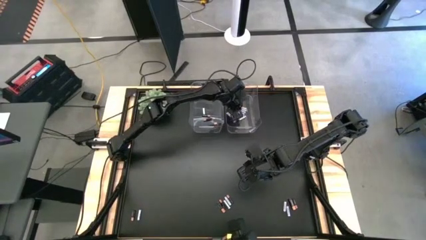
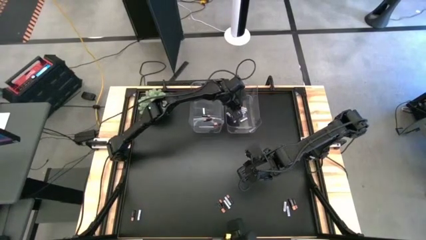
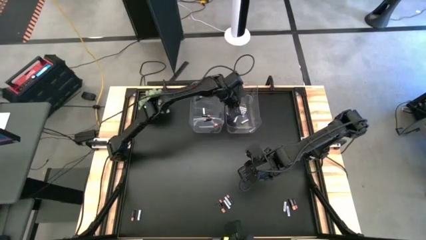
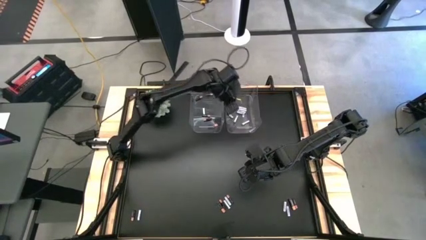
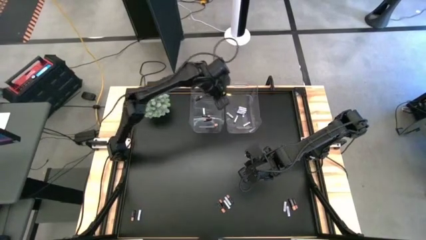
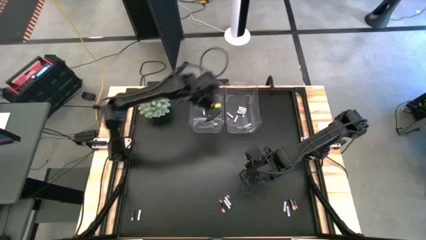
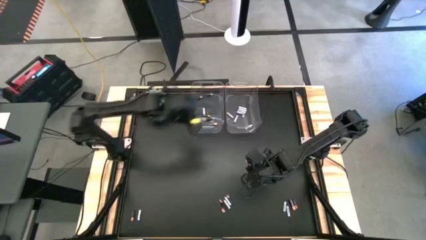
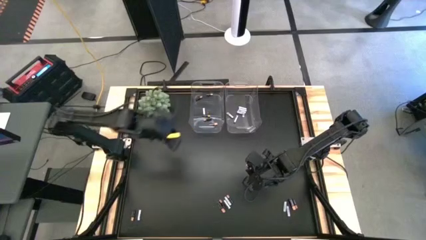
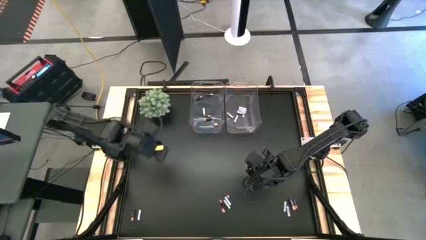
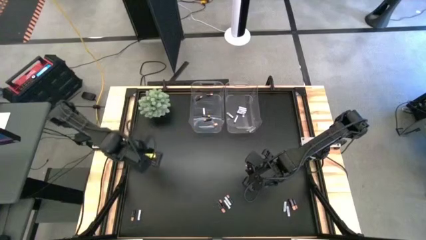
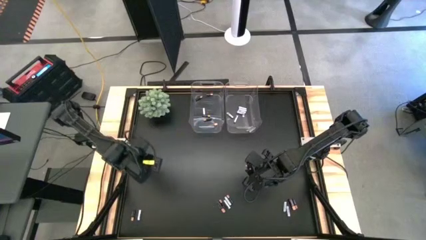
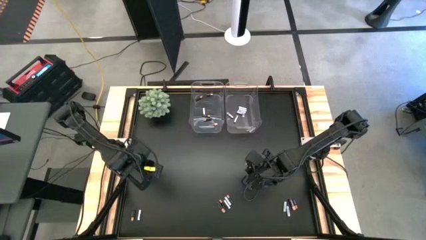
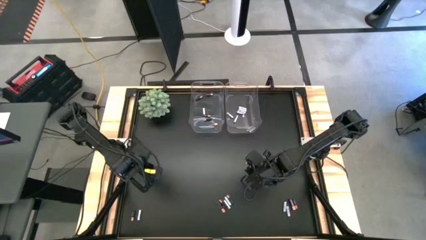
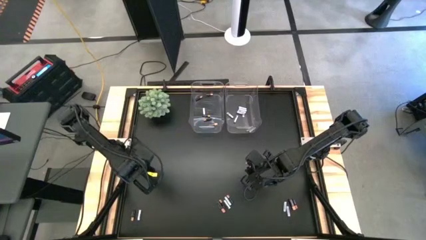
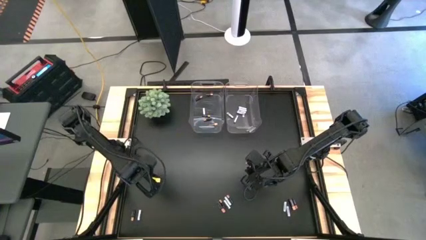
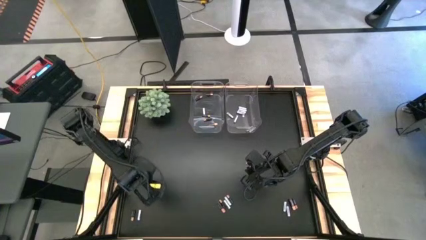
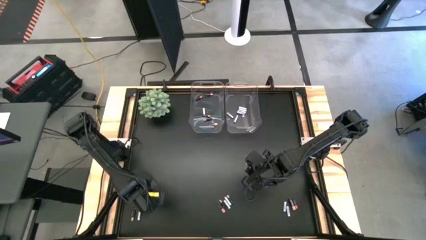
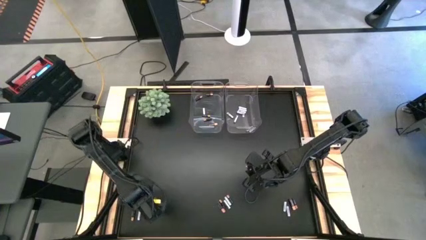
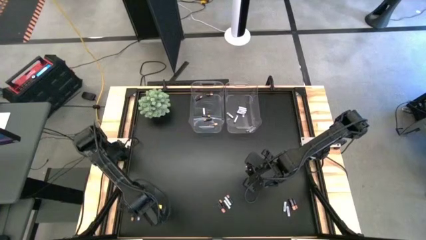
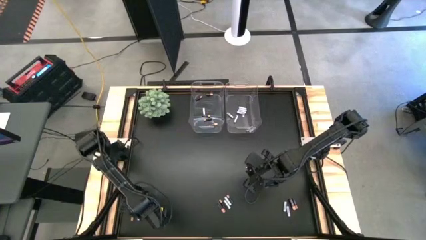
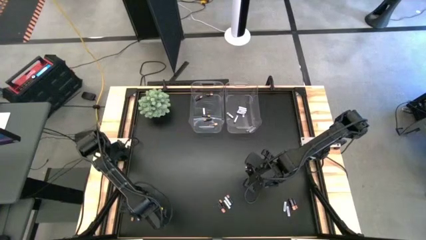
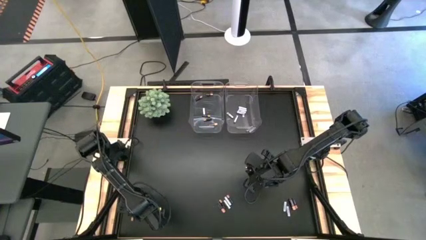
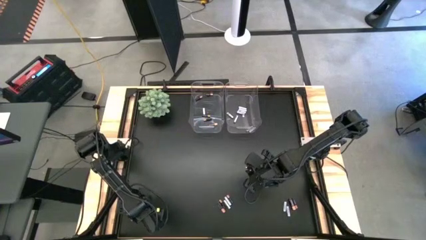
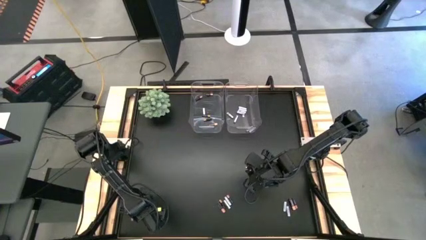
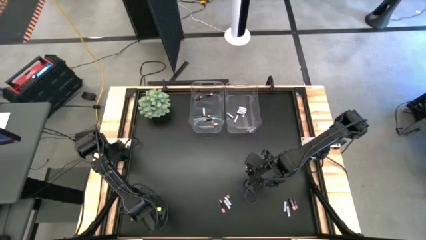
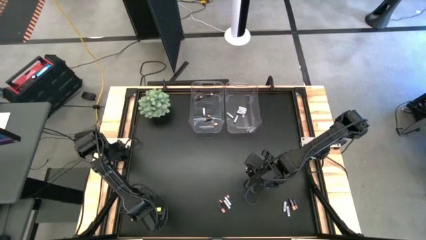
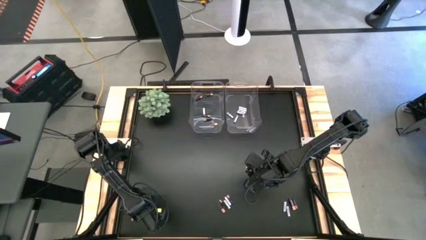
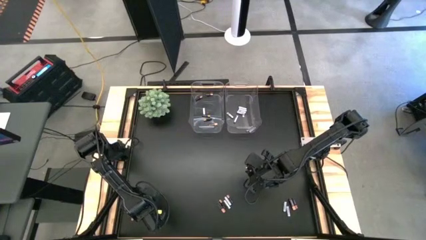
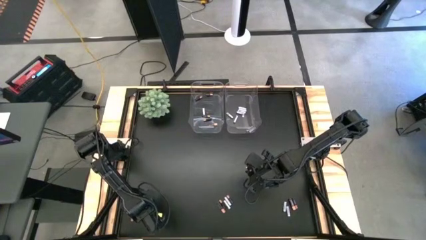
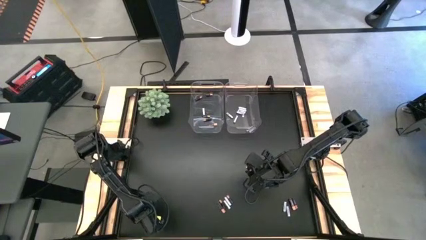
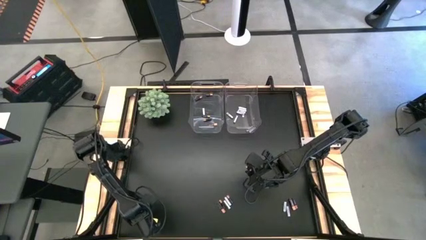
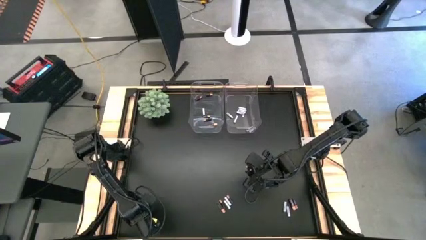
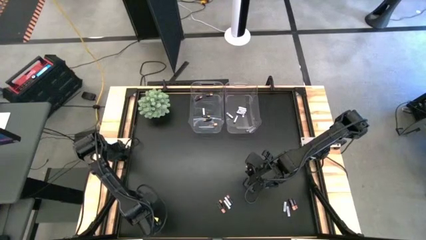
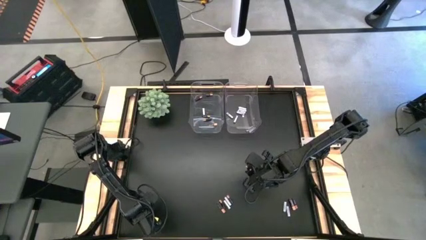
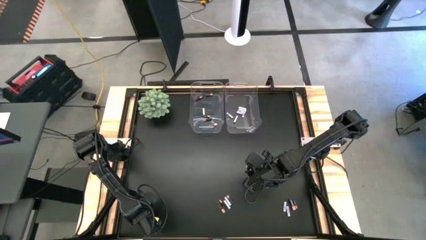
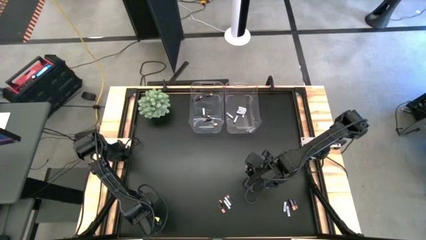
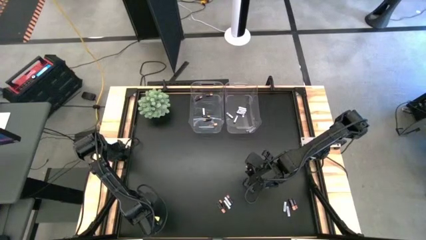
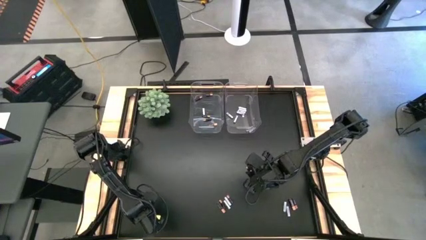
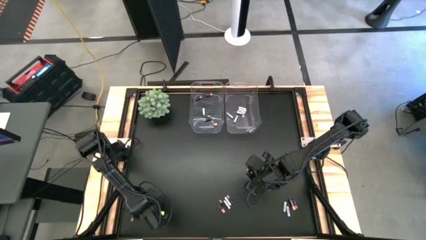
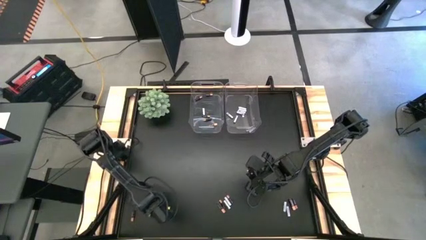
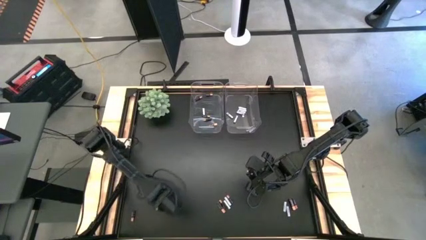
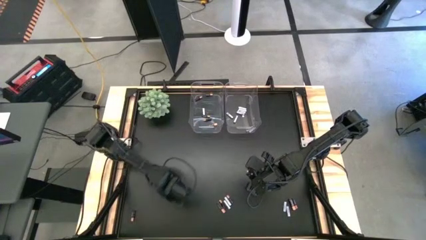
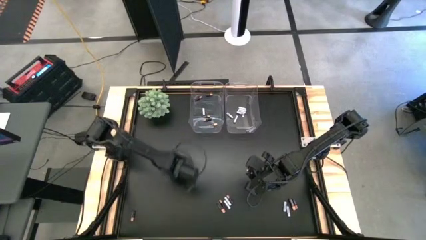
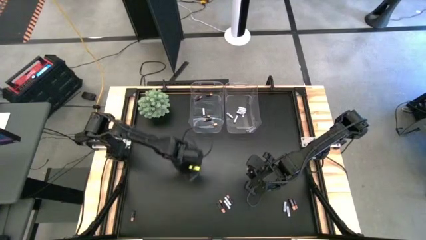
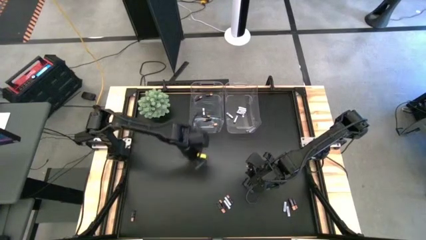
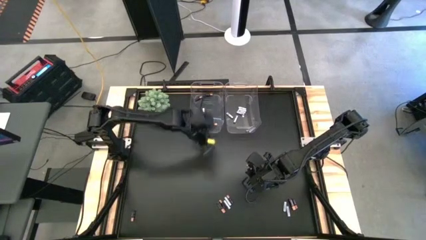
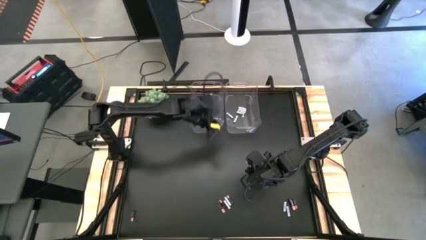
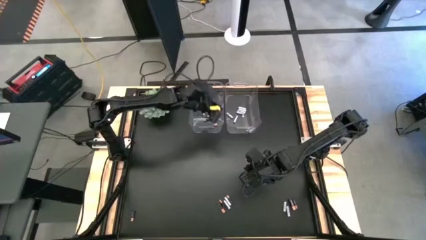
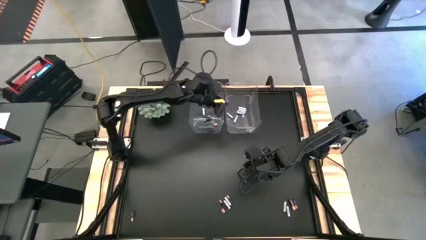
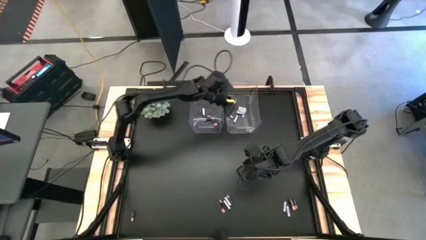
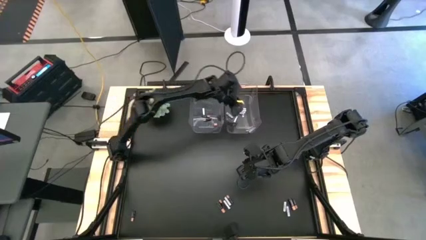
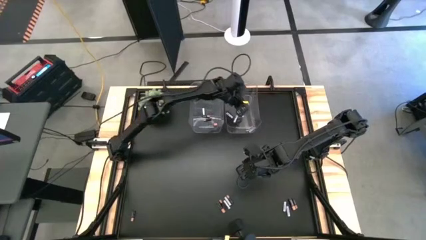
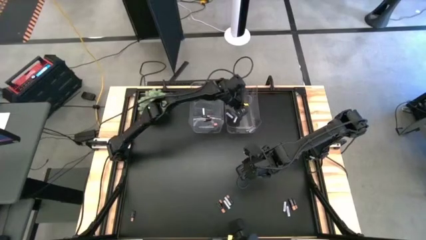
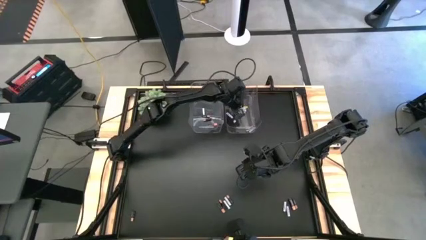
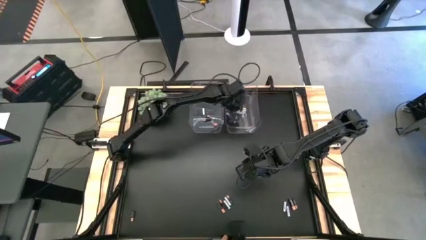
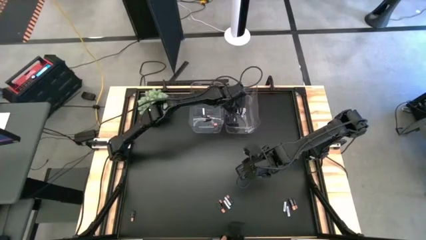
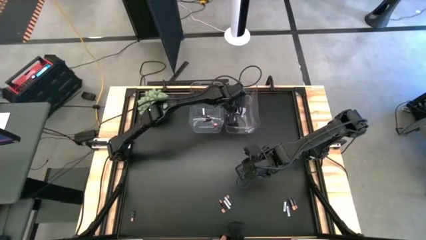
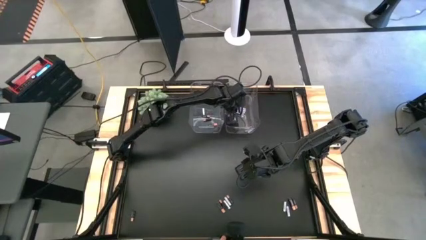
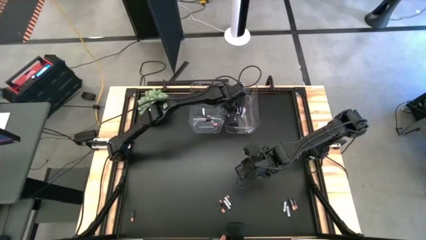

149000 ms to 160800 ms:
Task: Sort batteries
Put the white battery into the right transparent bin

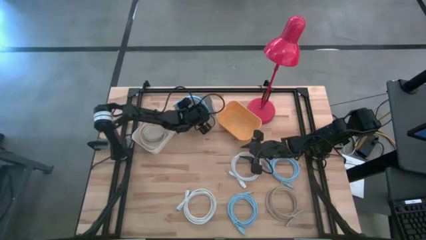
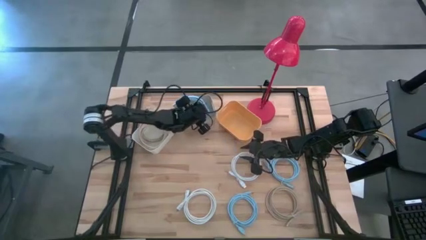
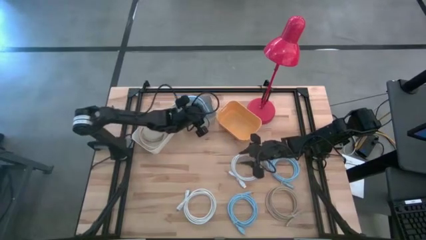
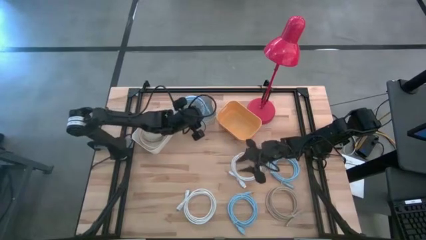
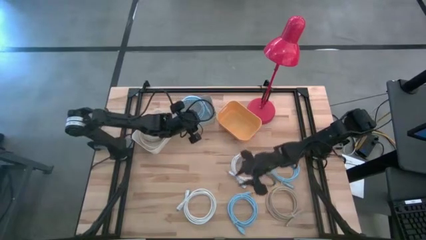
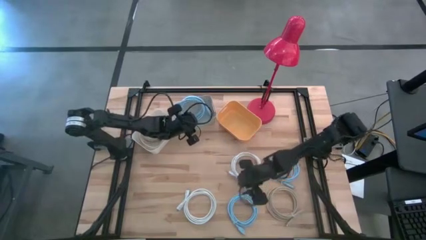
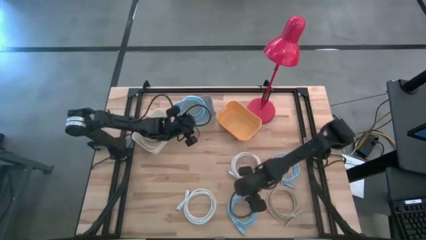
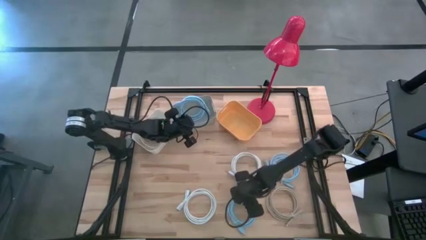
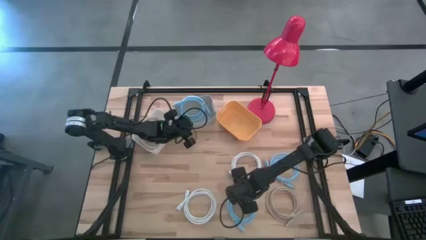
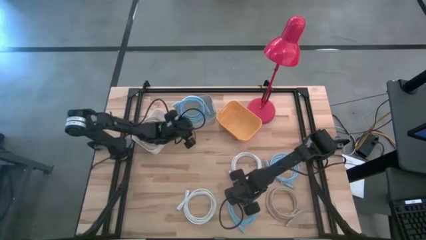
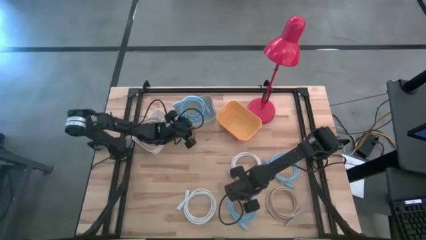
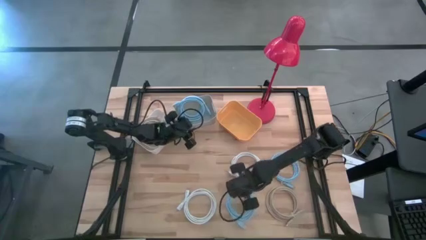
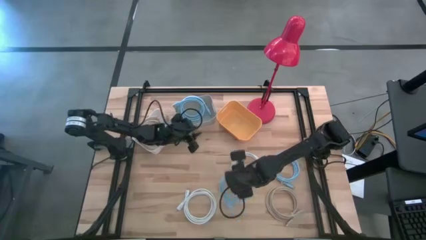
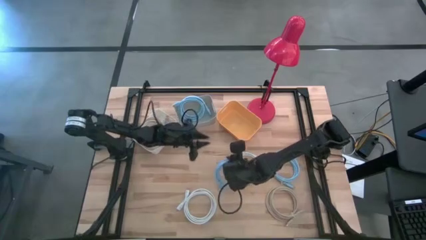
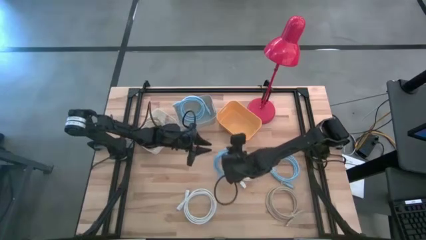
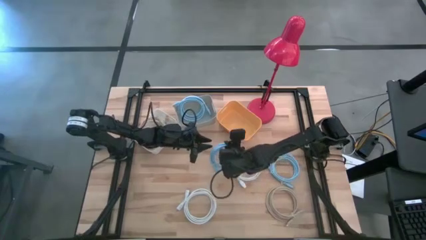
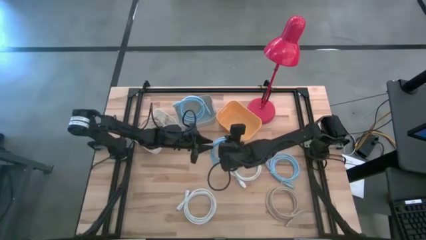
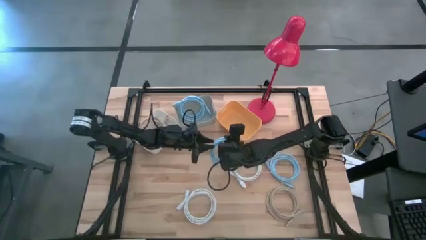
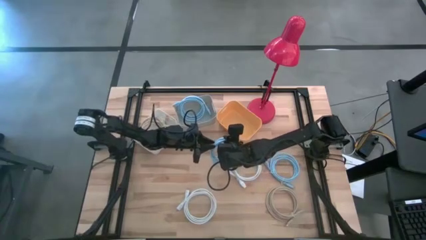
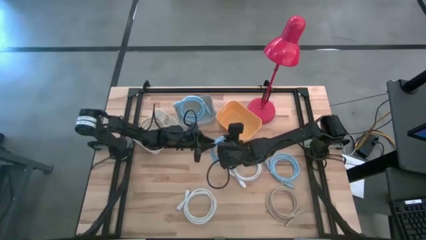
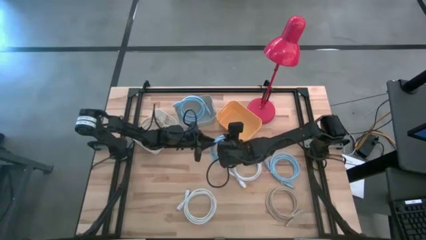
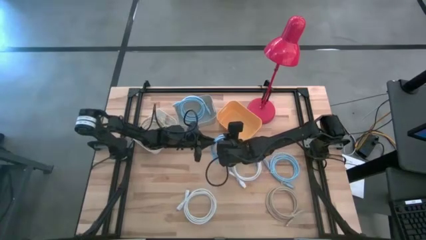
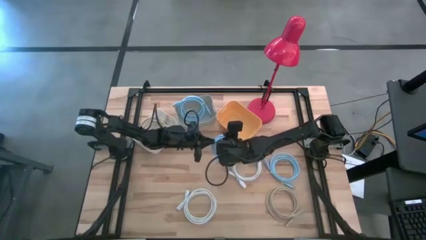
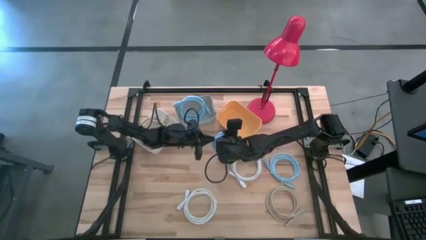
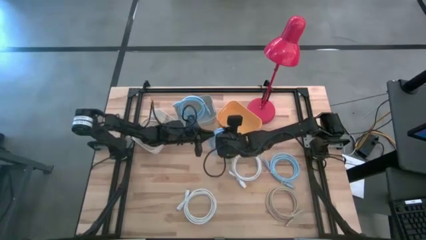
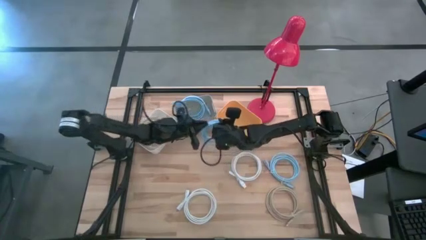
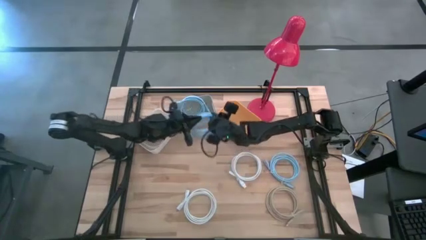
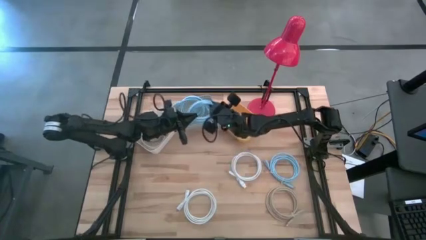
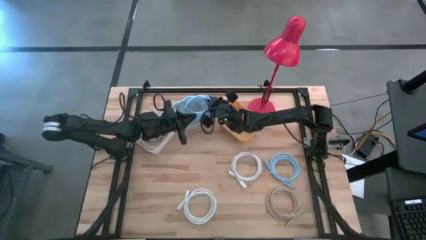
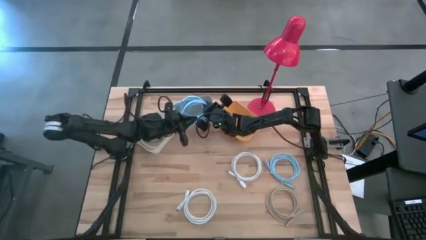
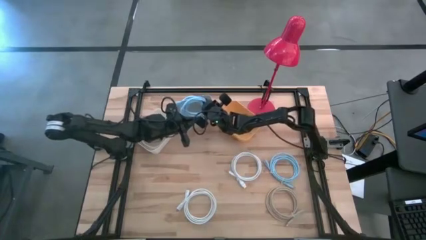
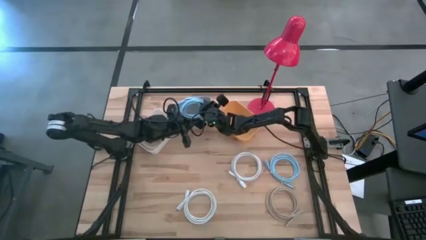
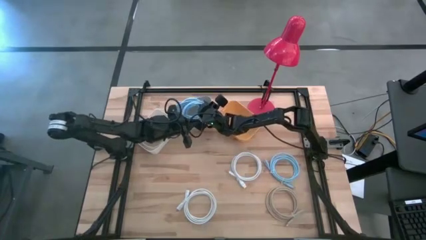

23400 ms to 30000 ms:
Task: Sort HDMI cables
Put the left light blue hdmi cable into the gray bin
